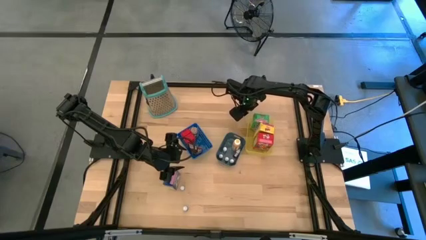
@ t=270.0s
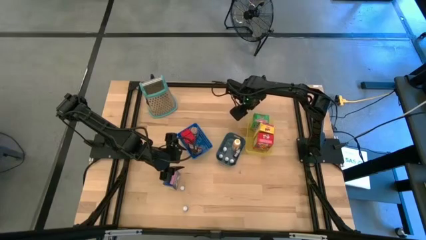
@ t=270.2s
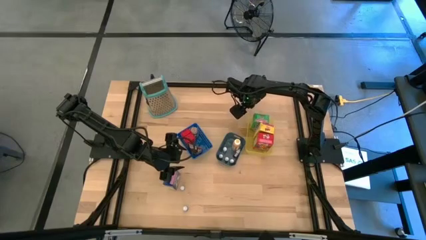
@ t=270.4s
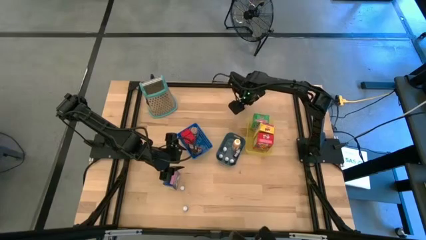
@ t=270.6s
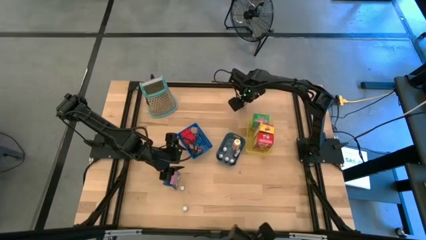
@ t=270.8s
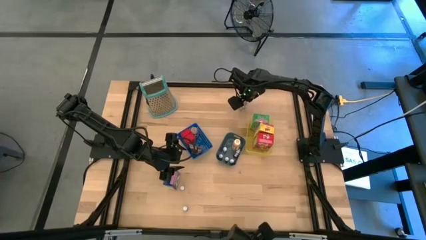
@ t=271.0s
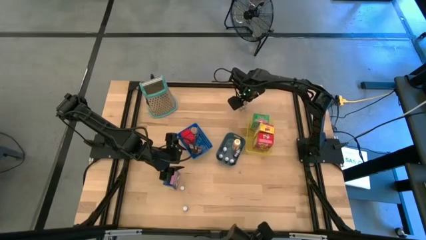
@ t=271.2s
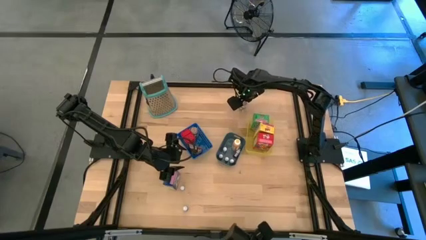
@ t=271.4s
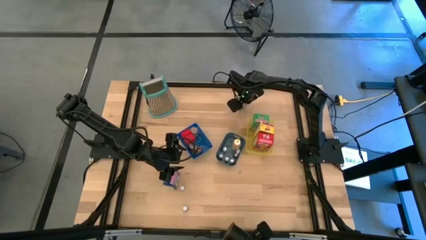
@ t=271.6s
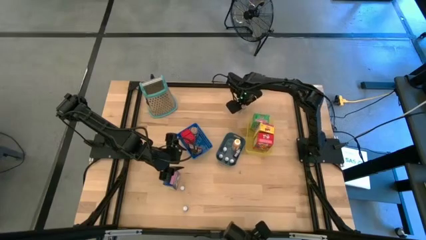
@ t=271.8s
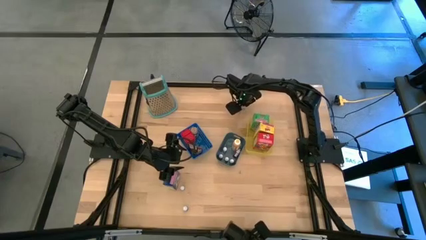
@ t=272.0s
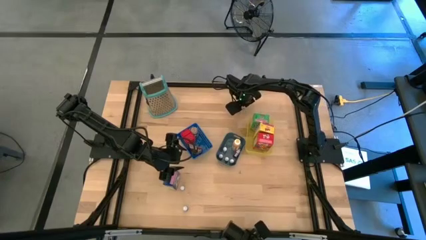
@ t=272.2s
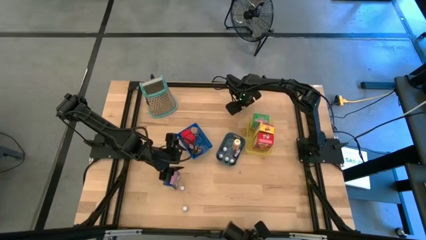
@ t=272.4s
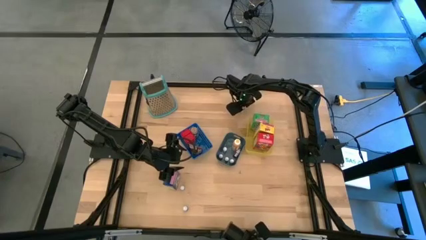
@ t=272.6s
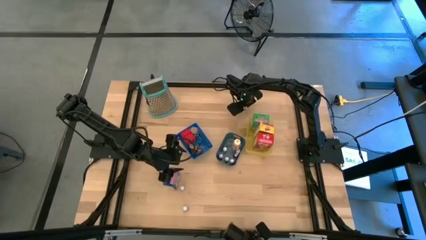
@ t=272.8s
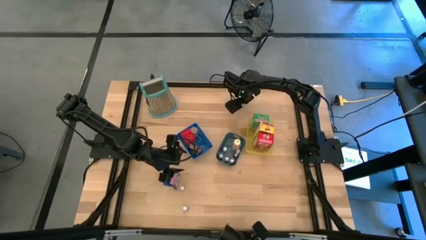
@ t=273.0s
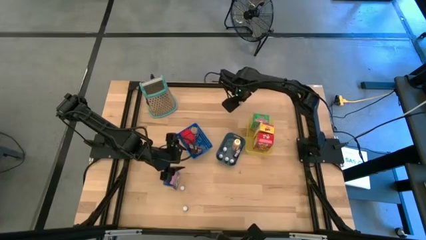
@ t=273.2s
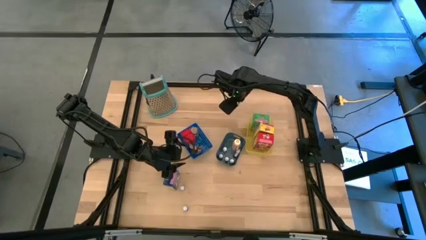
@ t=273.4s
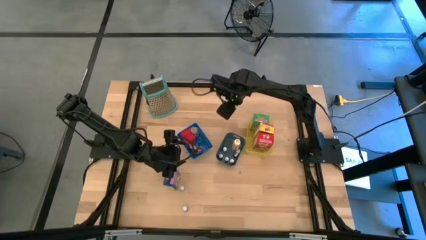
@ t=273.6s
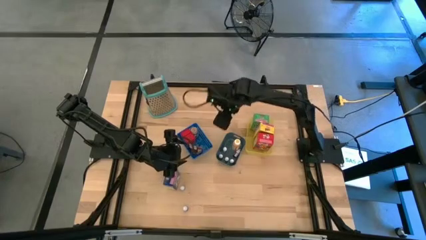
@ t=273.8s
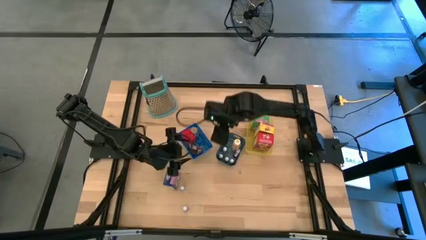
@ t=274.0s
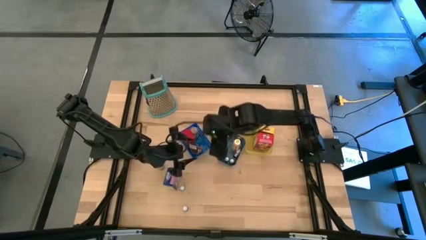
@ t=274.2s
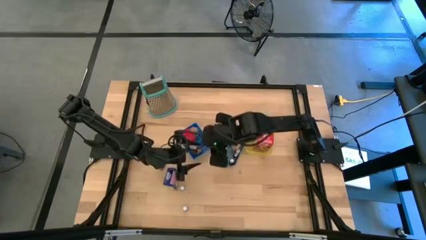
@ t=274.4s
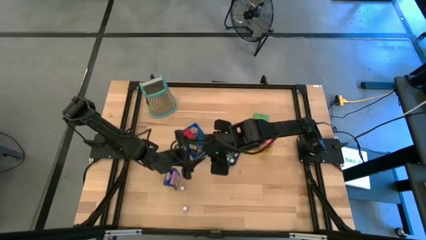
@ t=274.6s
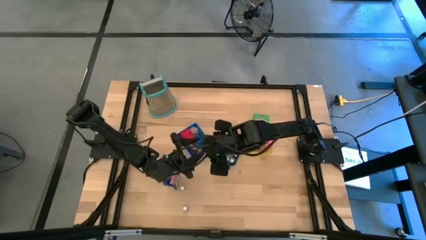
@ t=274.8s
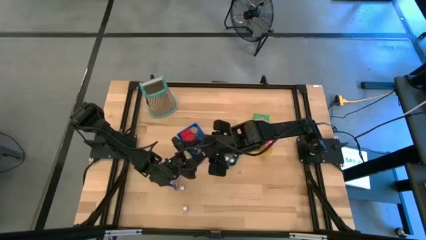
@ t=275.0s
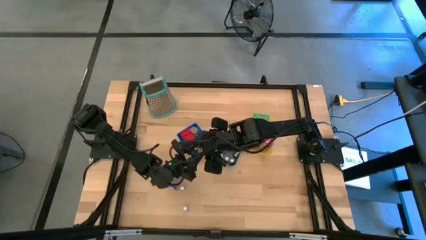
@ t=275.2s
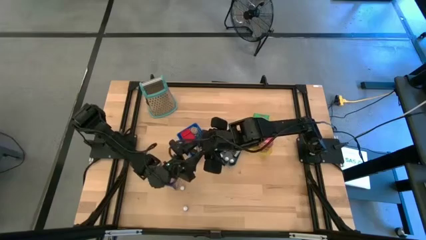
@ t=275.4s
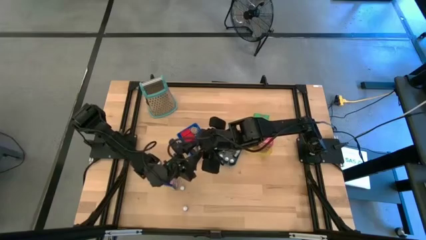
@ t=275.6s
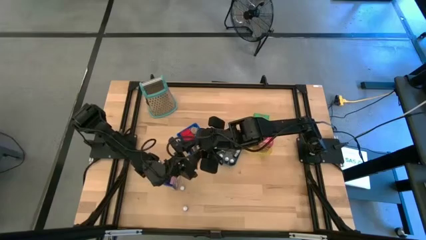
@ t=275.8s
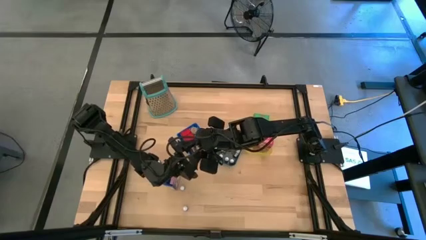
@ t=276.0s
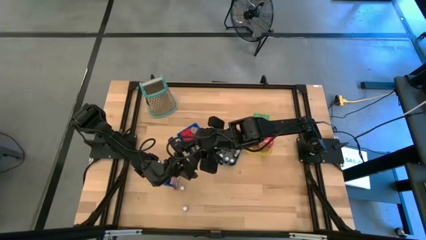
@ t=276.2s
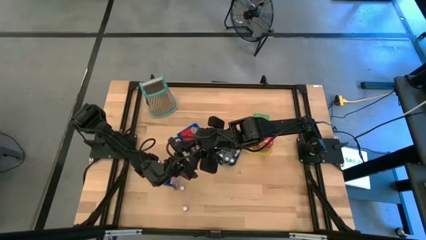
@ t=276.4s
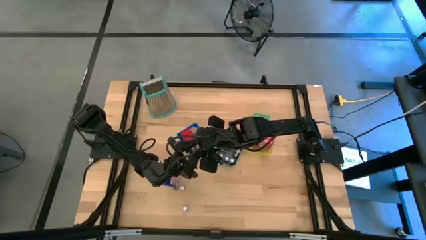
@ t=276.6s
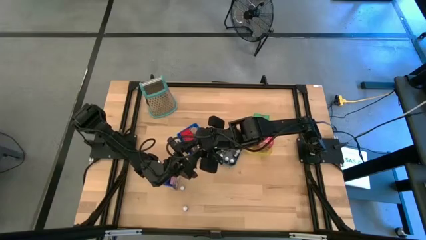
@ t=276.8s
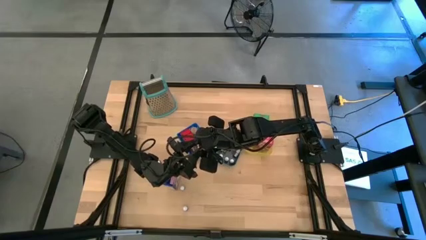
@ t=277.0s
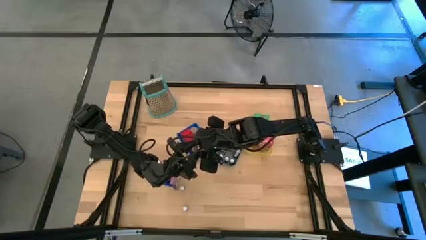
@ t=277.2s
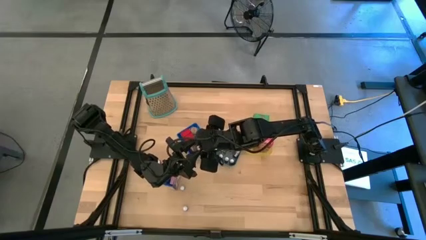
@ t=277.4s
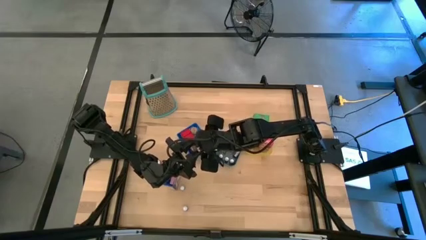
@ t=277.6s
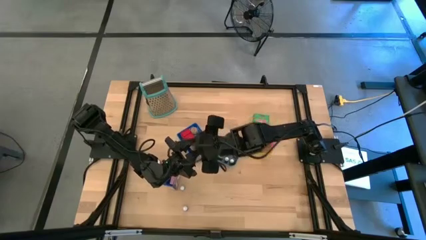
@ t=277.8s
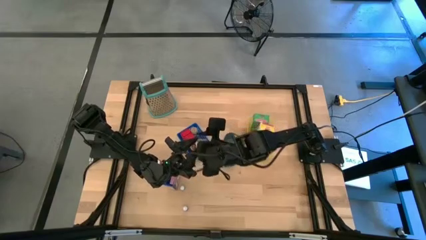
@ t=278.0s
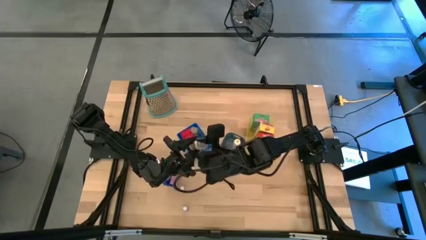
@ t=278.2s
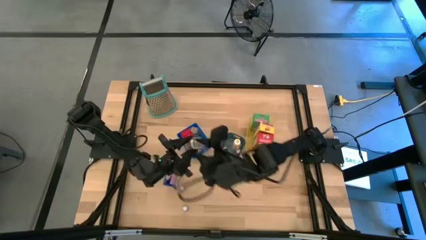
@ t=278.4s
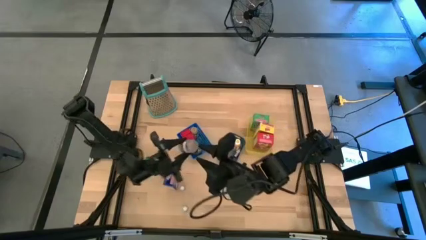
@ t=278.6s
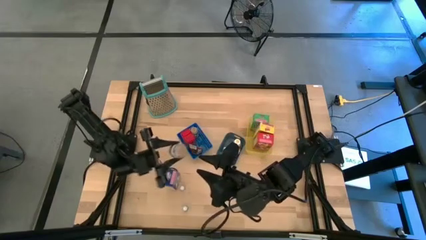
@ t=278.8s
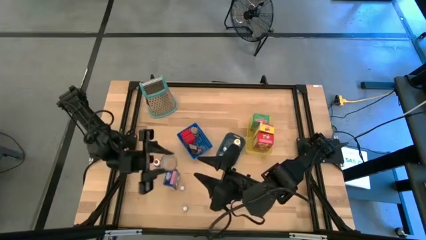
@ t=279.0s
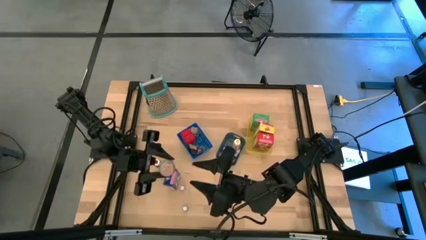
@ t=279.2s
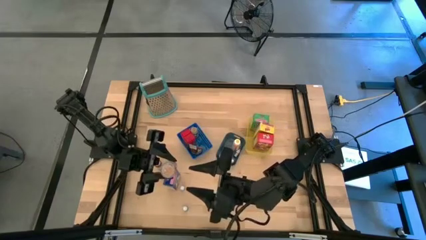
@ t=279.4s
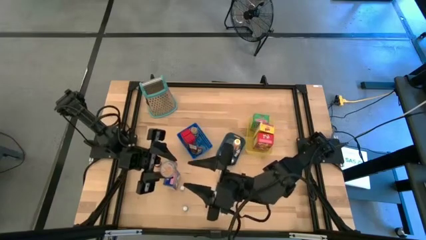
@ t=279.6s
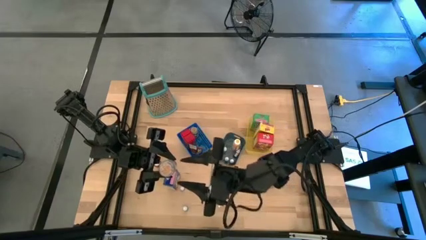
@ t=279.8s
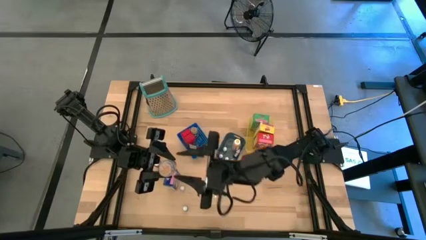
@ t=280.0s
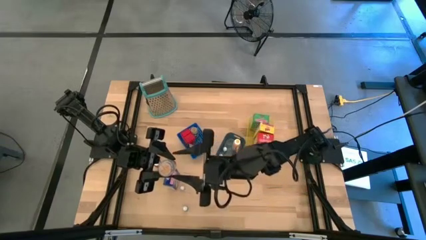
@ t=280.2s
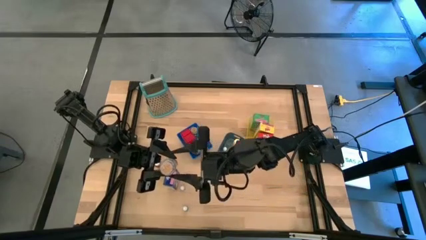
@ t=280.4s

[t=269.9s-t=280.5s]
Task: Pick & Place Kitchen Items
Put the brown seasoning bottle into the blue bin
